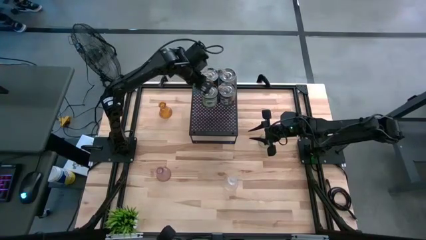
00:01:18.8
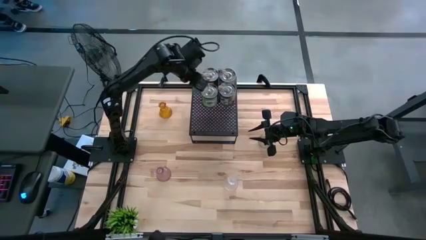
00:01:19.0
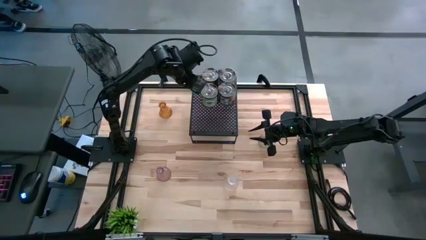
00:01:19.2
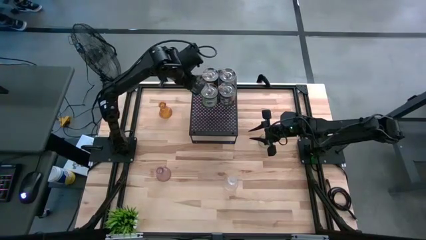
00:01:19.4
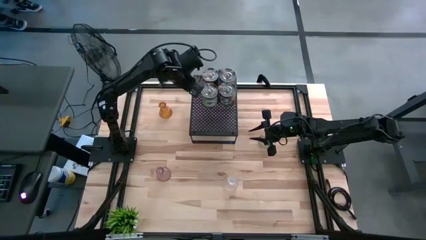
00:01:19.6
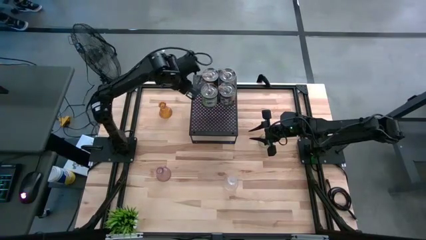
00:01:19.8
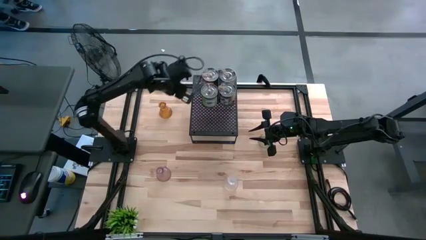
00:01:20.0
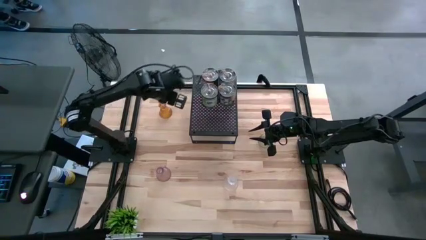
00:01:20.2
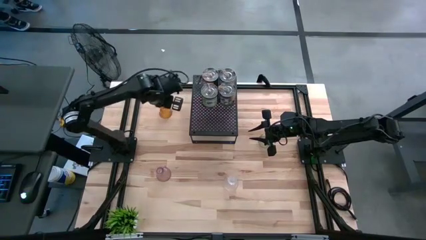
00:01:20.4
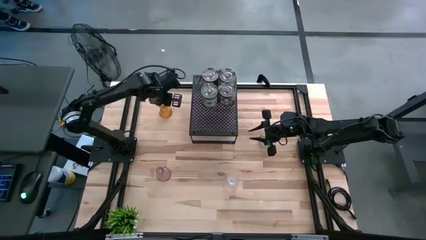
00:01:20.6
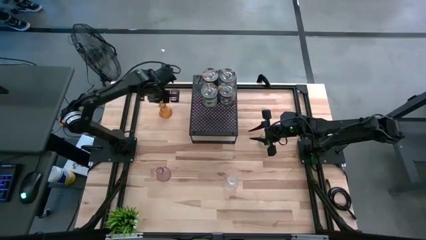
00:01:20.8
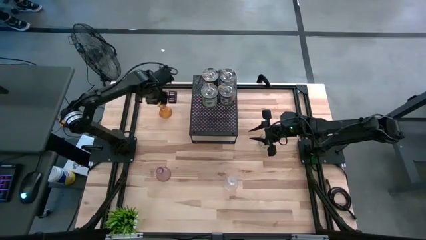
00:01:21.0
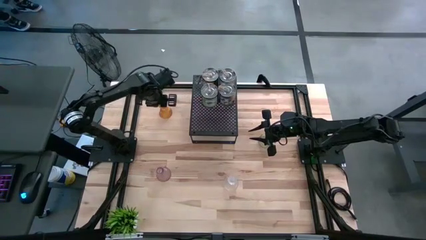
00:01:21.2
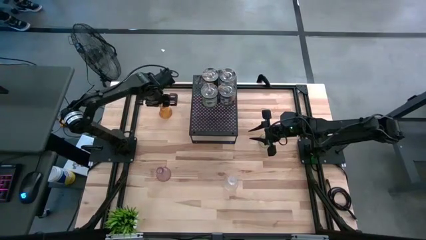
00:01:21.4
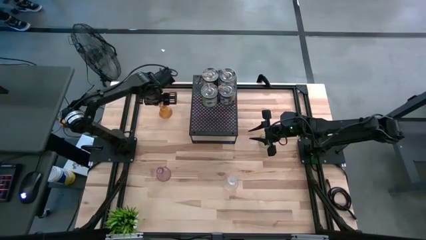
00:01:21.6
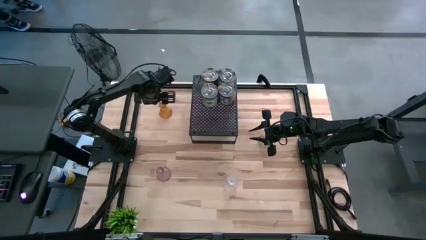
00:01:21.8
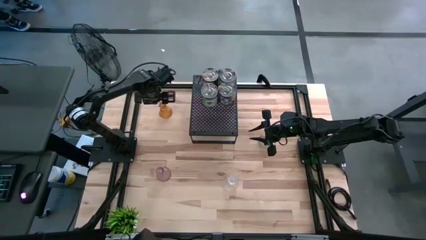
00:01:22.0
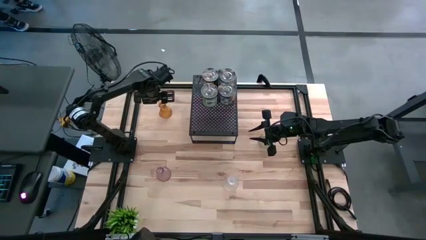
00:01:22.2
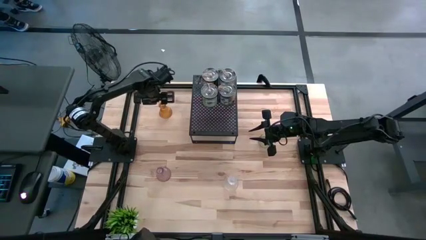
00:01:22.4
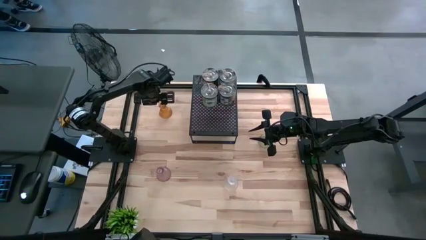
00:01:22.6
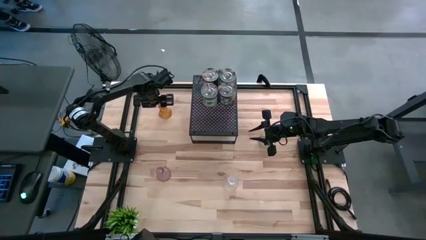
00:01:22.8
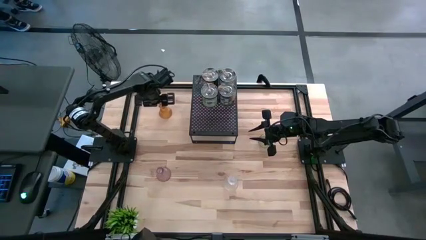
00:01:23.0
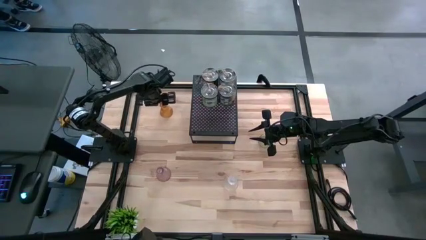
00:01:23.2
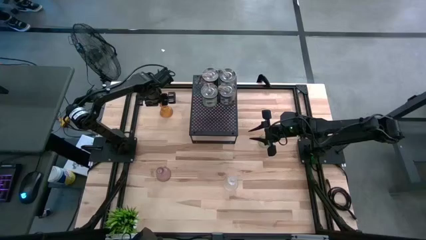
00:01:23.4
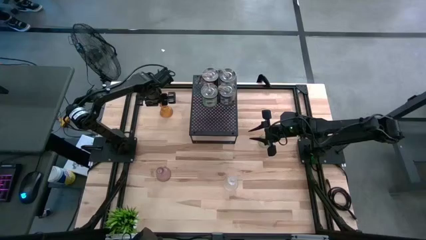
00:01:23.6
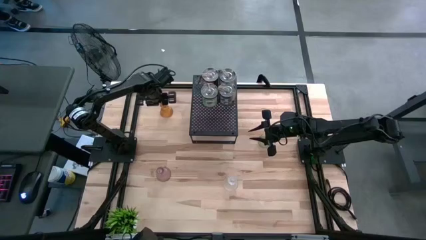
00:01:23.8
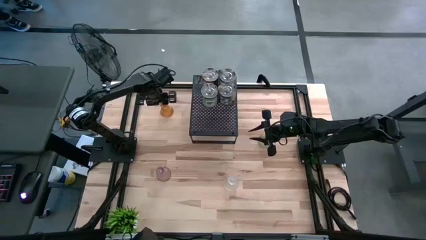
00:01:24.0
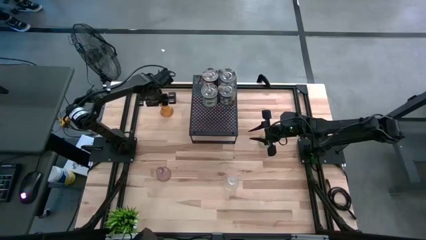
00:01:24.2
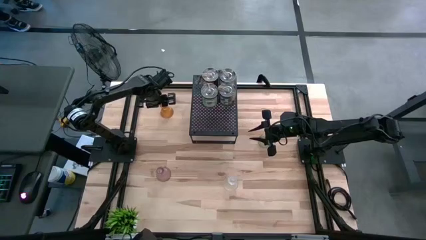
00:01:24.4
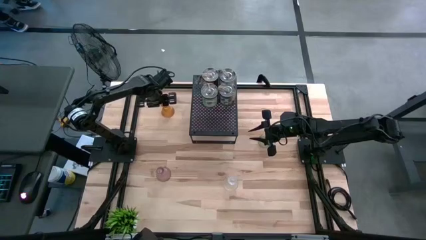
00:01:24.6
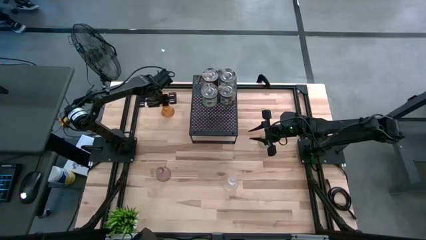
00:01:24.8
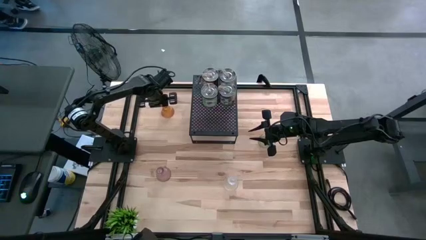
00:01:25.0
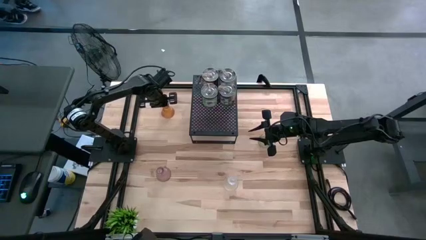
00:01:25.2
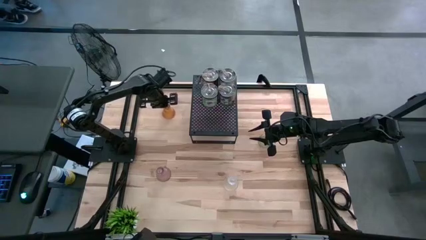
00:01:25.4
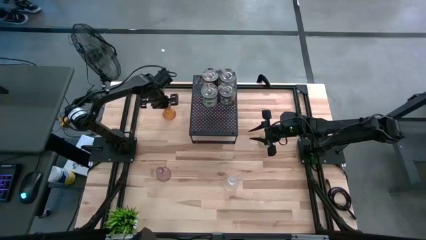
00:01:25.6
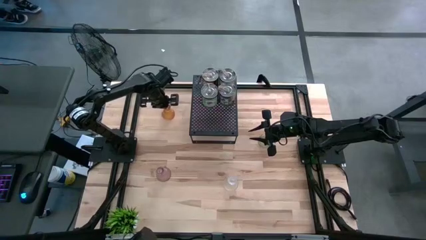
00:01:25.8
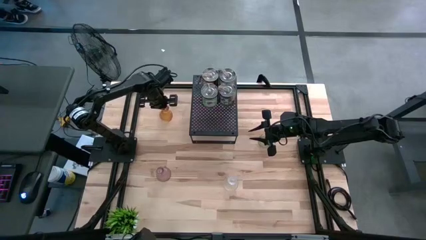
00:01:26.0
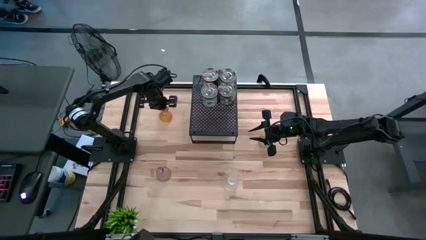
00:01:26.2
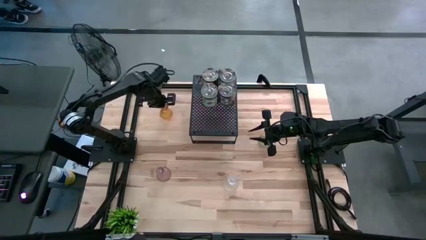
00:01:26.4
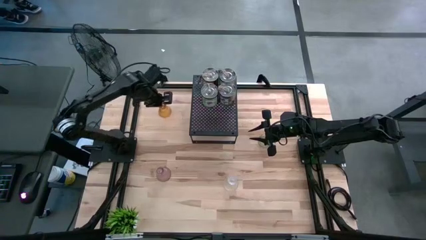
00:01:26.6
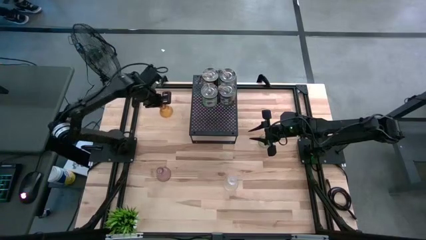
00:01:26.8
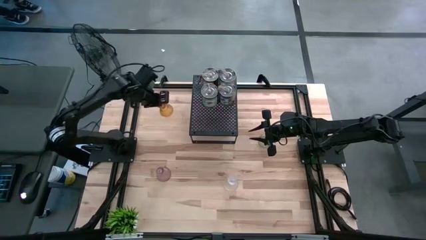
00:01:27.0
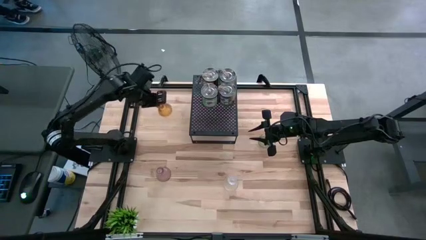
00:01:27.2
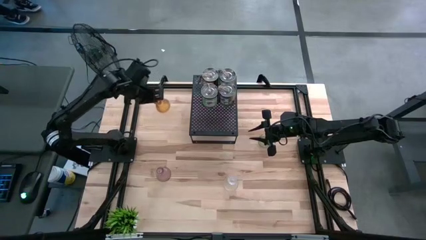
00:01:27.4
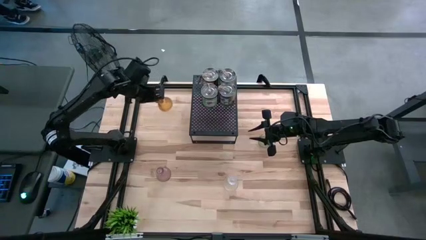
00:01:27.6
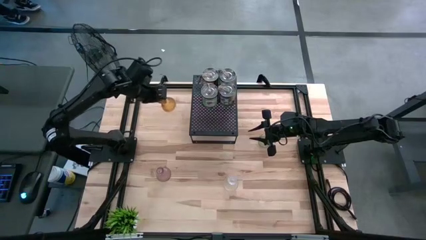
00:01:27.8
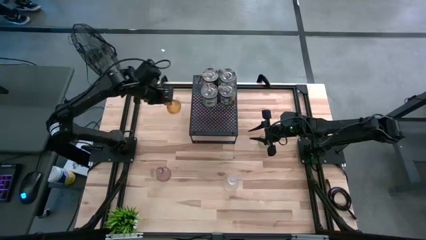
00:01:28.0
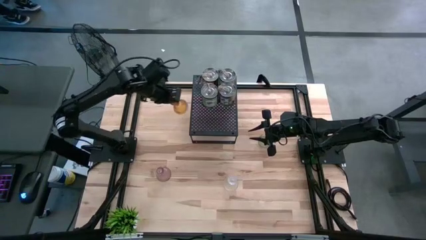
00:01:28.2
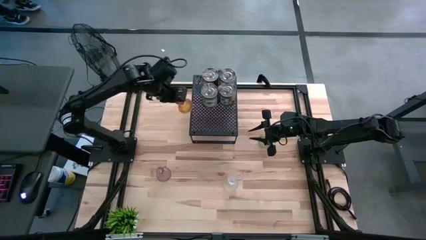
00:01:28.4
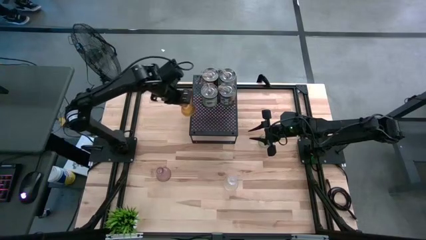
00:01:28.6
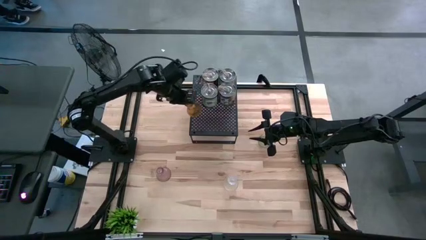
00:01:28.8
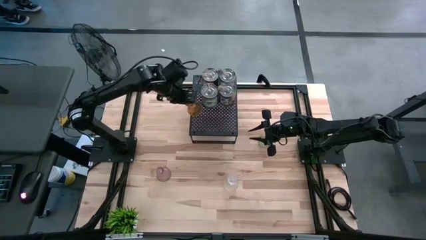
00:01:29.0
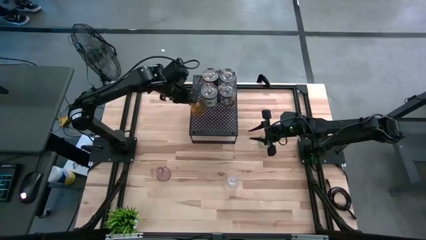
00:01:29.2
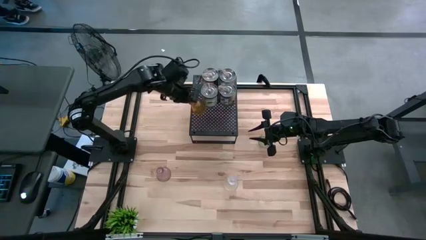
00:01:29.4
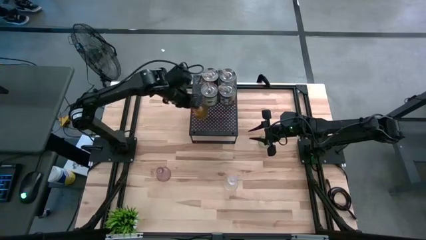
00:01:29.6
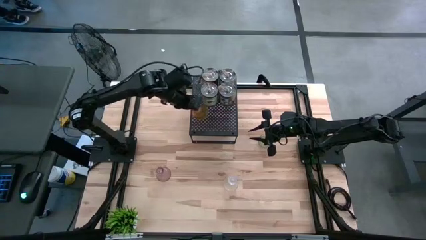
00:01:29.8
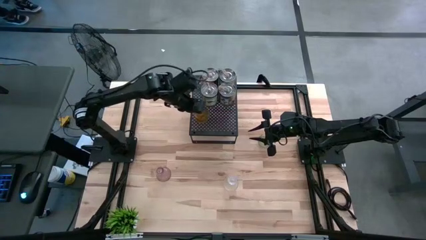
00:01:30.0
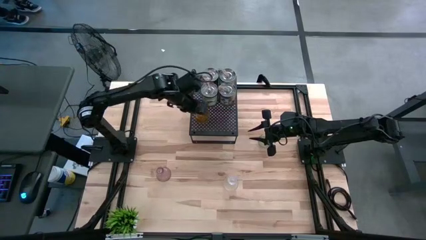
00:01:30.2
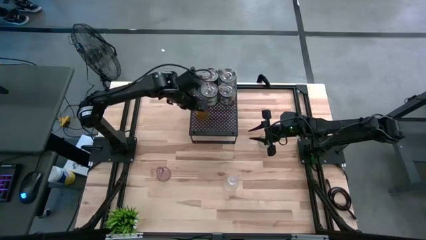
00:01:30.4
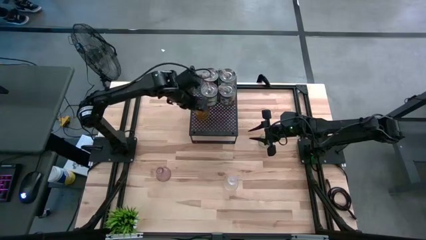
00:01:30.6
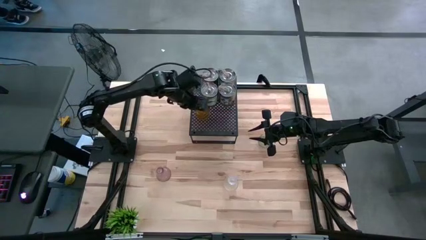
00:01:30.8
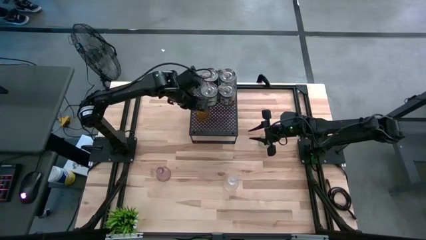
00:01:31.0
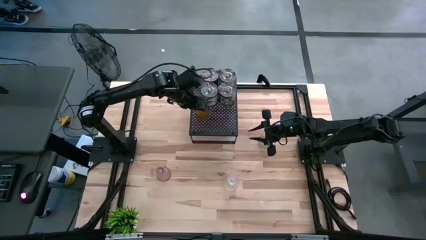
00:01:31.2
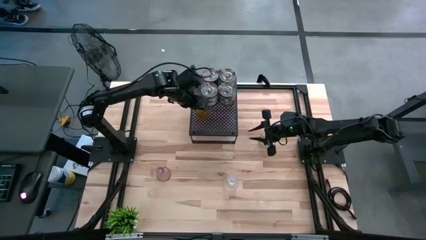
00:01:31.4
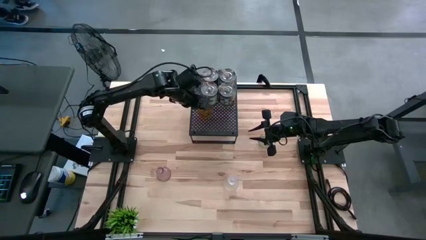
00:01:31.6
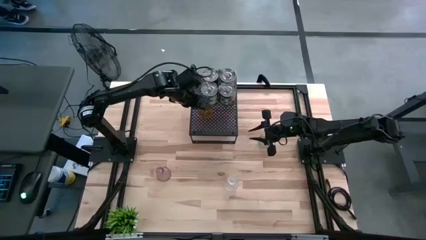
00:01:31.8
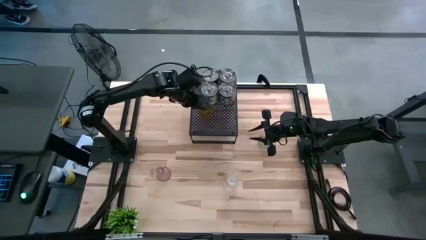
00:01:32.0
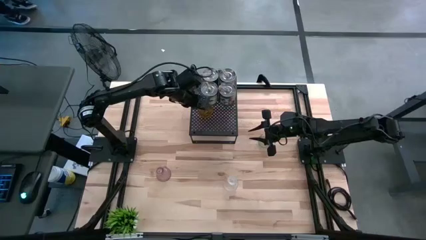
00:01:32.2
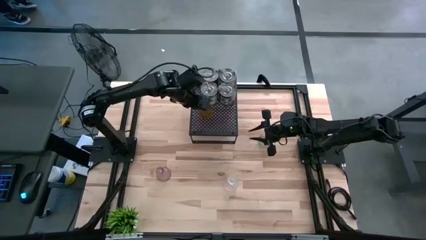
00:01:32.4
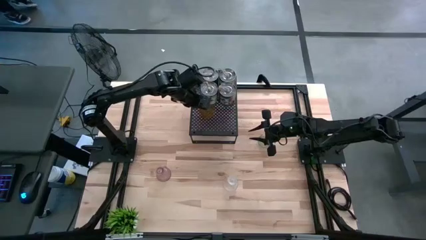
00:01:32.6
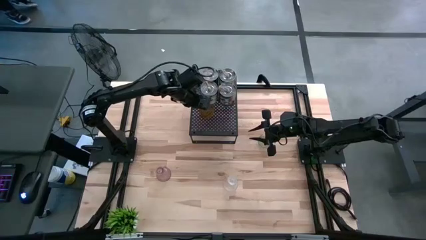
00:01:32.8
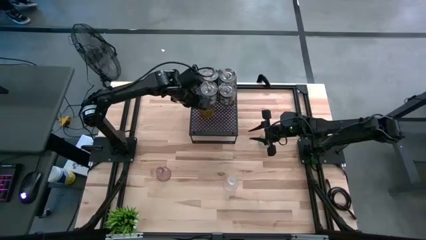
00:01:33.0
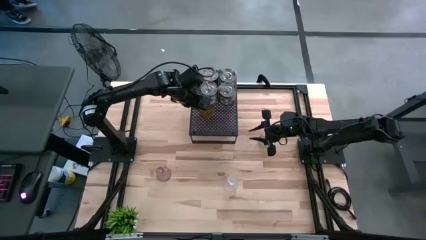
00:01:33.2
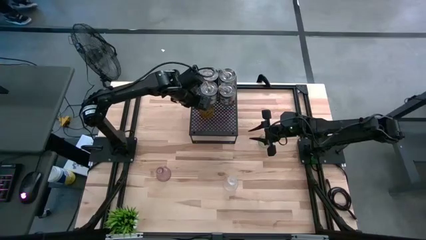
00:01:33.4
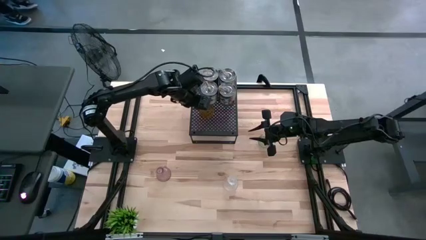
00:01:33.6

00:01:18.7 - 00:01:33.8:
Task: Pick & Place candle stick holders
Put the brown candle holder on the black shelf

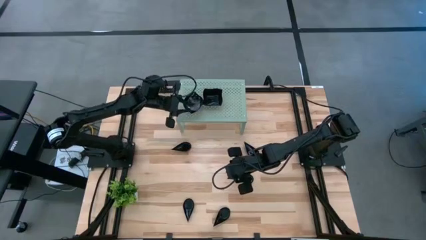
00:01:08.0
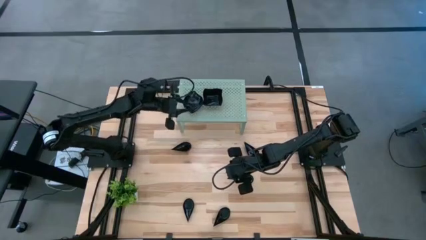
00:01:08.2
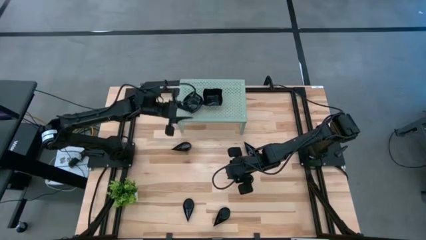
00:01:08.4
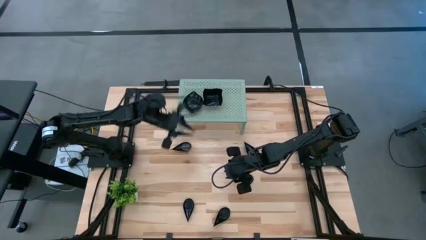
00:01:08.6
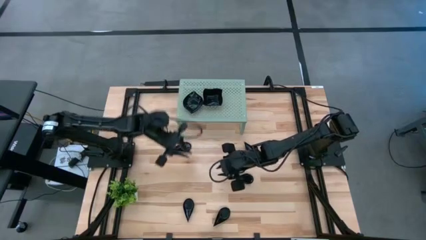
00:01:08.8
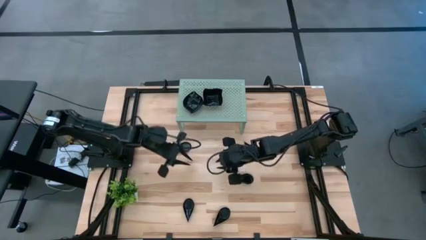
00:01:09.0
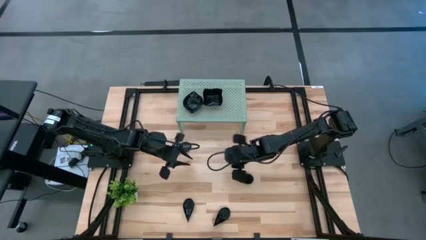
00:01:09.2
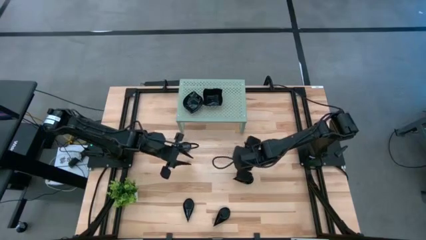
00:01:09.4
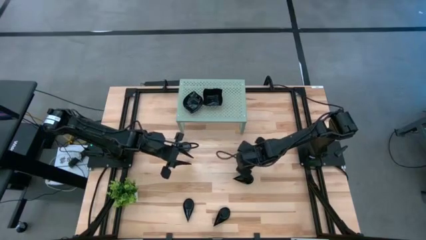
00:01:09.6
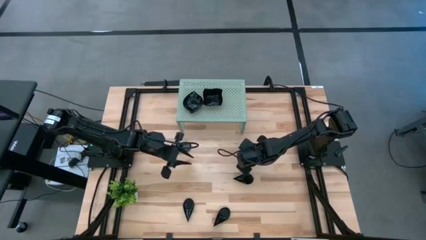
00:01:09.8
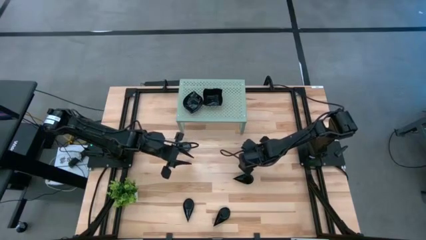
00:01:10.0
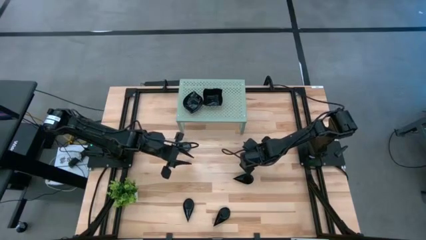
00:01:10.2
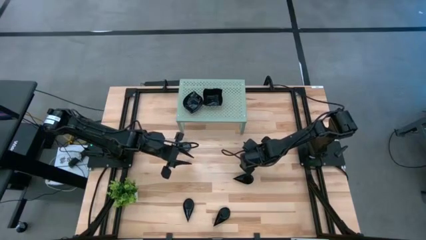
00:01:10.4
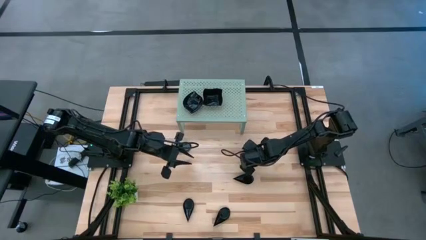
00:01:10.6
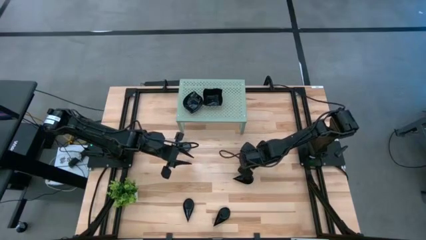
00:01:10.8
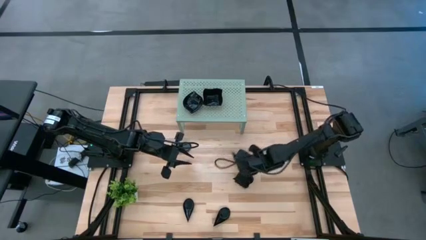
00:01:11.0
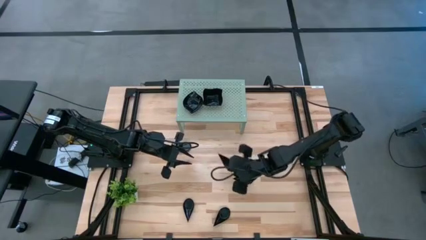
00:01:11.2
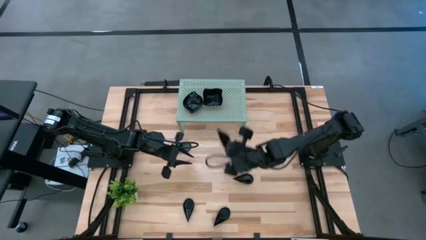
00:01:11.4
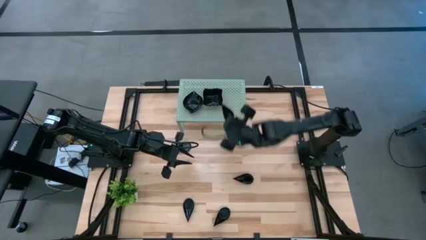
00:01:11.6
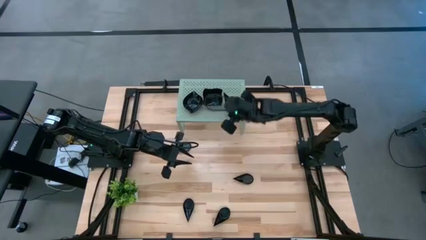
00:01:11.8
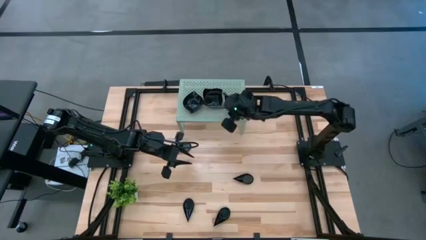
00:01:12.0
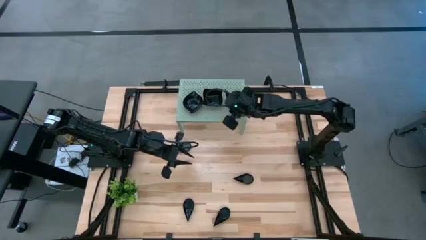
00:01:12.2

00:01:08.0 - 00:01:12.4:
Task: Pick & Place Mini shaped plates
Put the drop-shaped plate on the shelf
